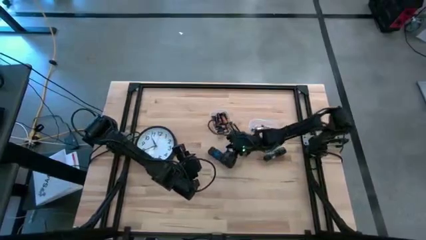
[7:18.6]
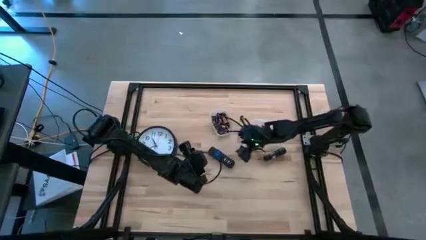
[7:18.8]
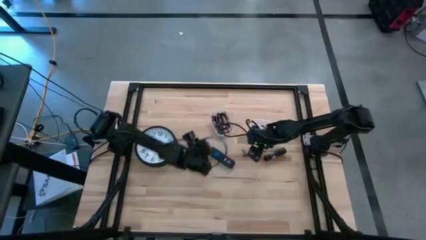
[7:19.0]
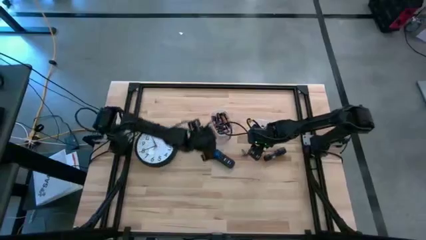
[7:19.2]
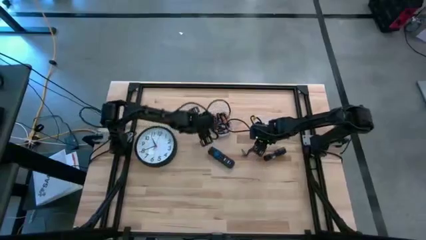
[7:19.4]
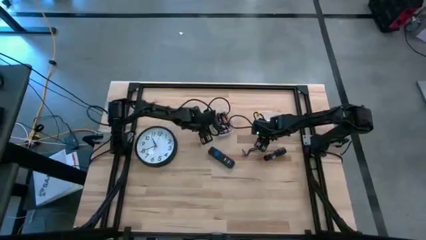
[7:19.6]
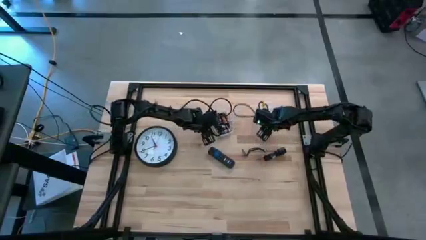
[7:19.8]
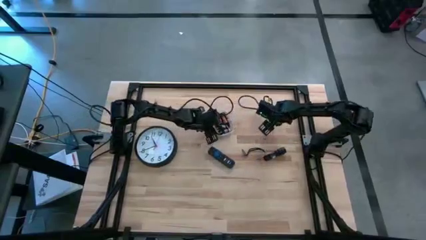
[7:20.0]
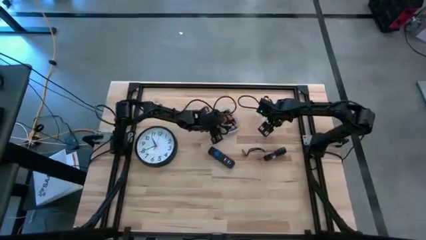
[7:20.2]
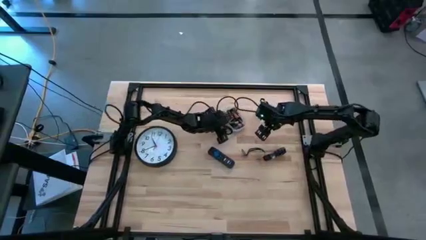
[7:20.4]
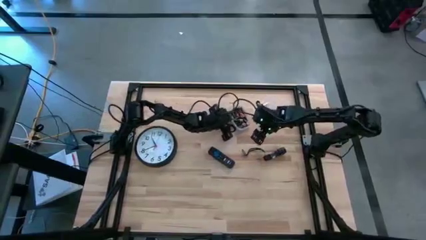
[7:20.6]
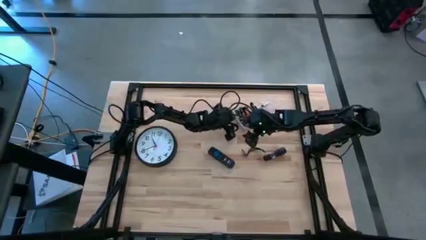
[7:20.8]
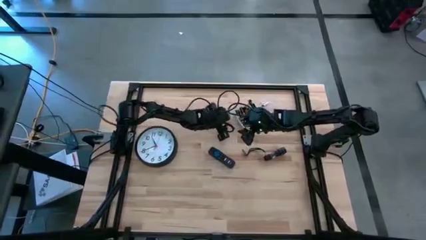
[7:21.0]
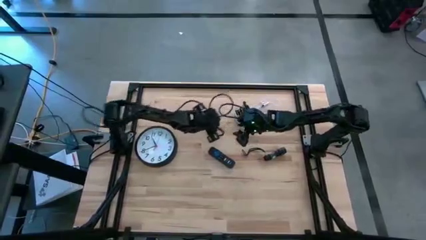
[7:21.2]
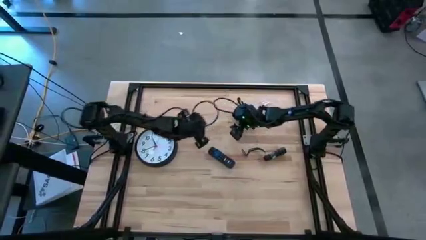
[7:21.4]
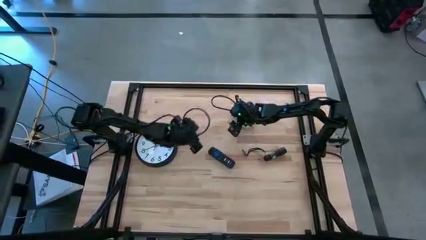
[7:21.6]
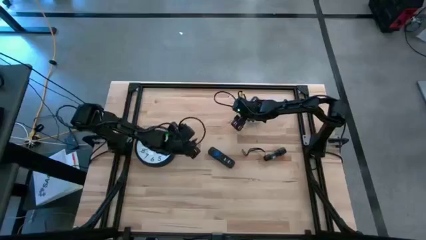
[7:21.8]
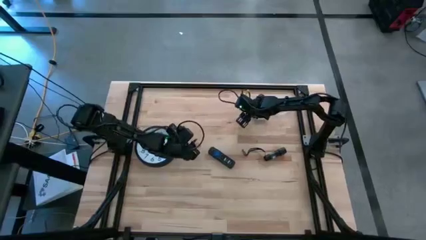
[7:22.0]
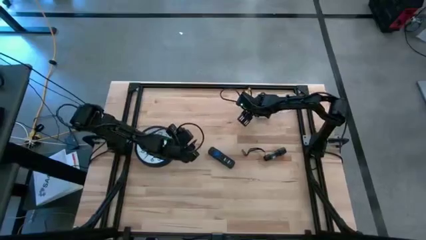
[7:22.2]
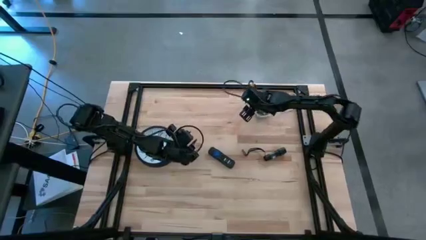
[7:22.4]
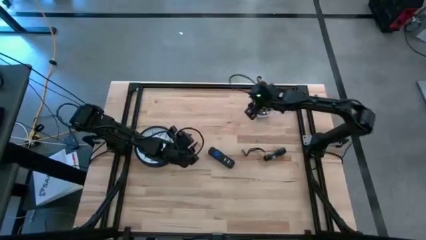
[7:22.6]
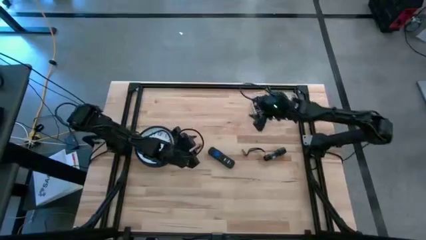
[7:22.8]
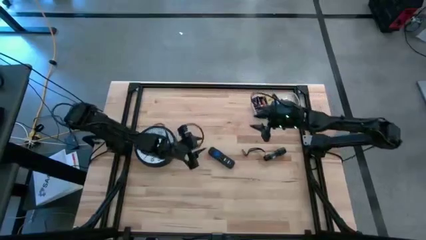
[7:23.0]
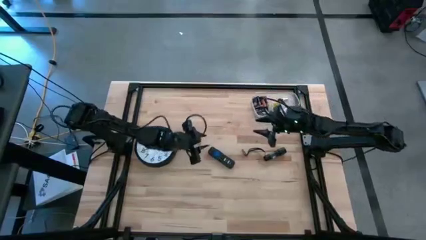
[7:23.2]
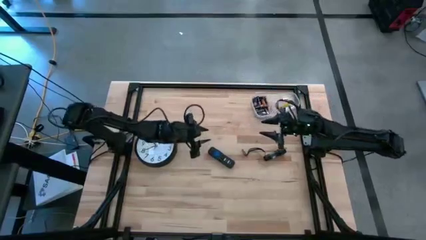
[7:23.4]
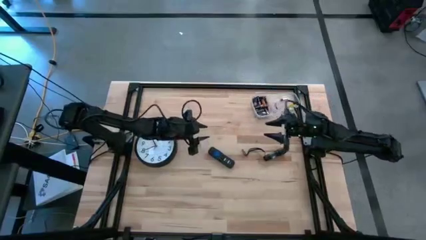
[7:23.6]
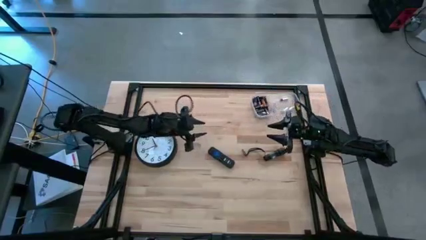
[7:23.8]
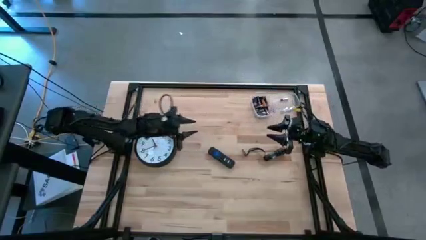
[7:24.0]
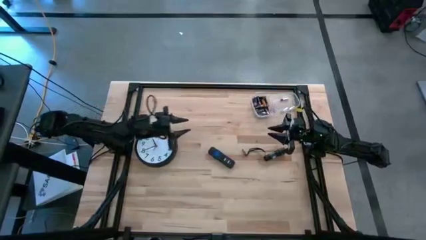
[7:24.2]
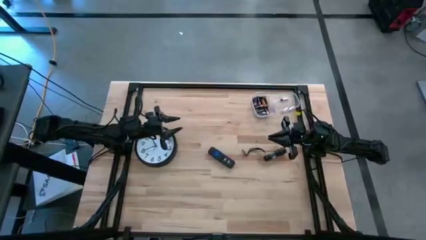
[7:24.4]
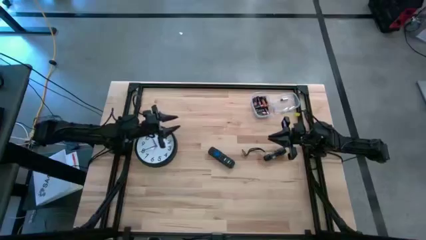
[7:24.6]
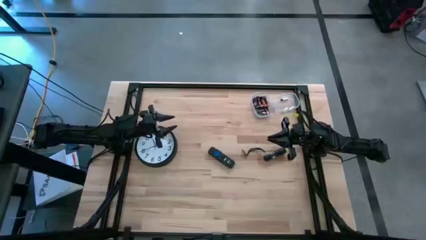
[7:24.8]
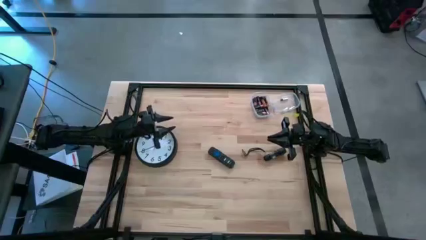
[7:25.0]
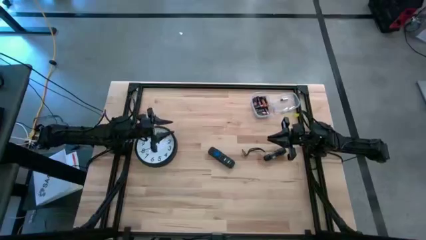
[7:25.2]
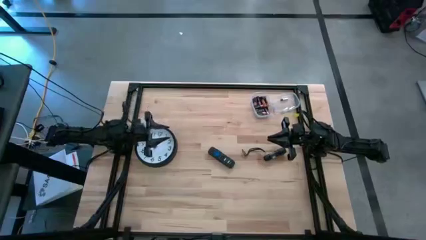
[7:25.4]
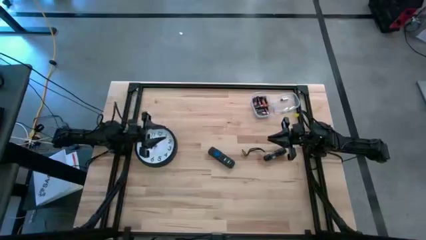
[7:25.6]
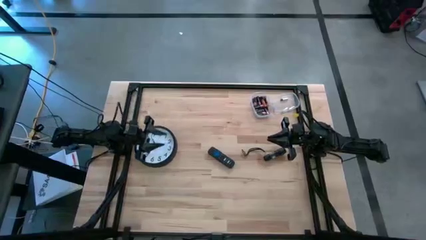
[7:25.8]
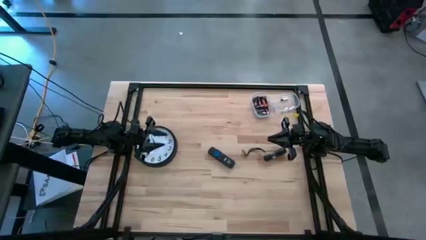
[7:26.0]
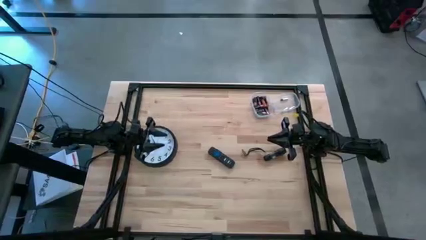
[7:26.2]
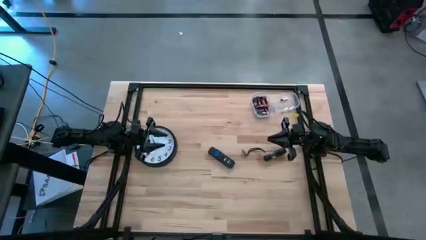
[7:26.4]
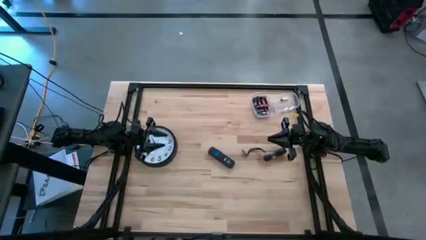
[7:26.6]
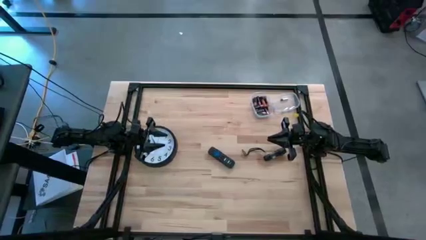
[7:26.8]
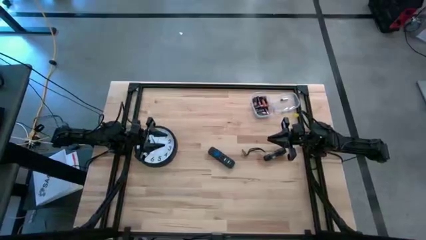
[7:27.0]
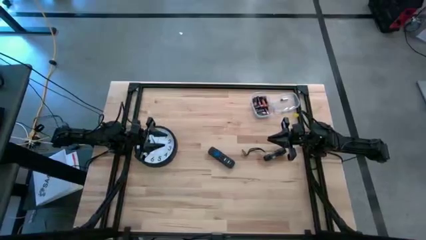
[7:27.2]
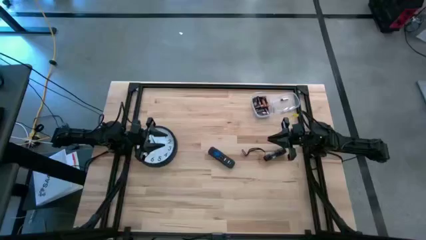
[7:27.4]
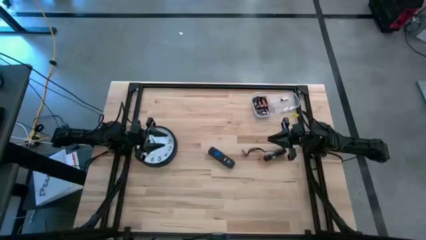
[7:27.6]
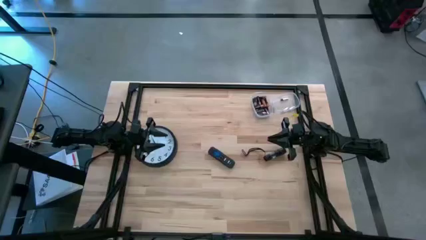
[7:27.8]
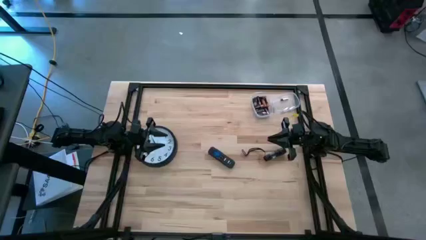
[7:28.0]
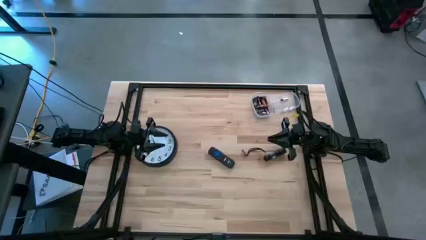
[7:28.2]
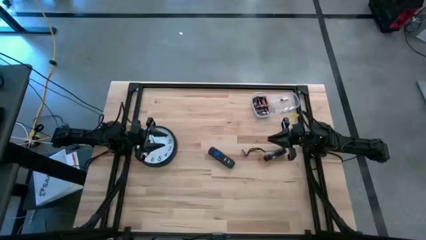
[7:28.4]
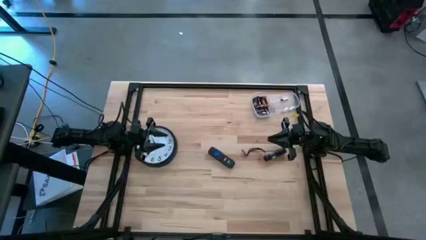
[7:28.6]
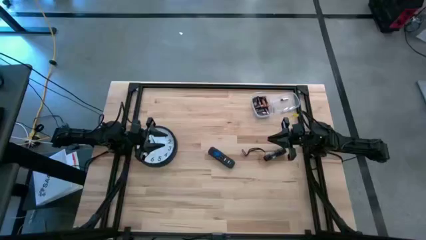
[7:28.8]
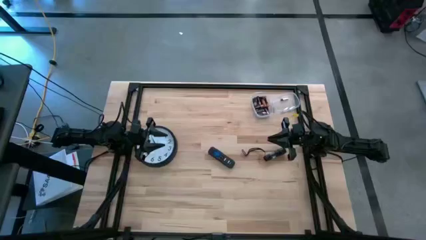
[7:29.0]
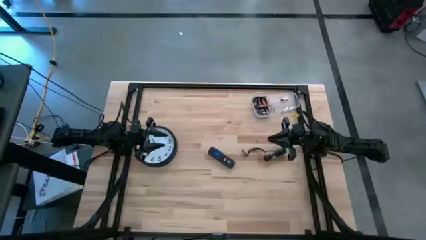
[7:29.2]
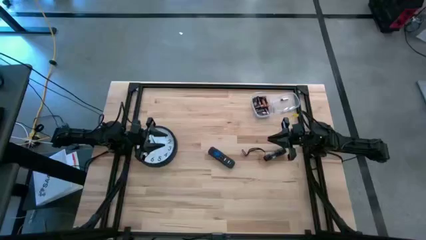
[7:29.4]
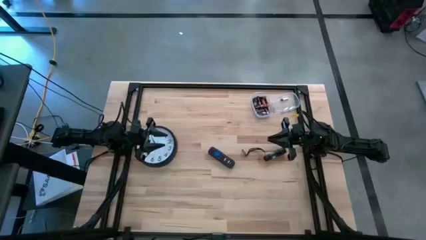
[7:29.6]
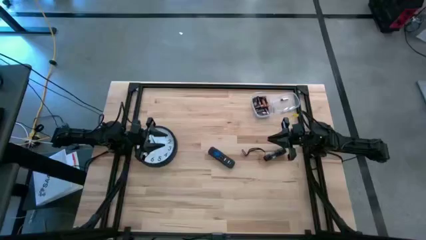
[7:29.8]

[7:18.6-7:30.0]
Task: Insert battery
Return to Home Position

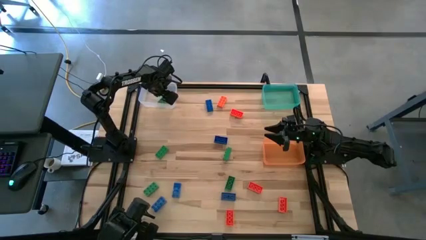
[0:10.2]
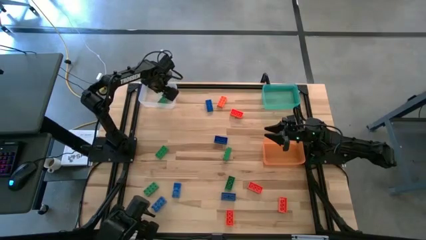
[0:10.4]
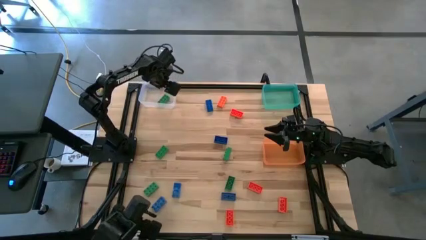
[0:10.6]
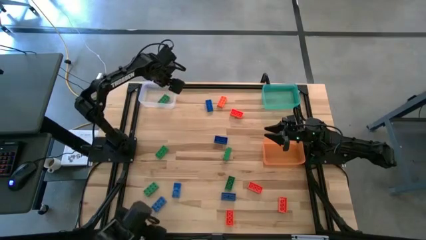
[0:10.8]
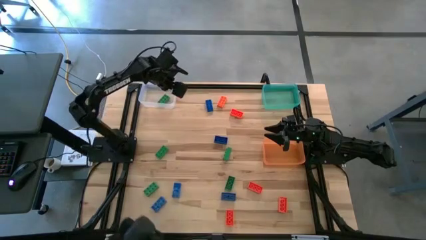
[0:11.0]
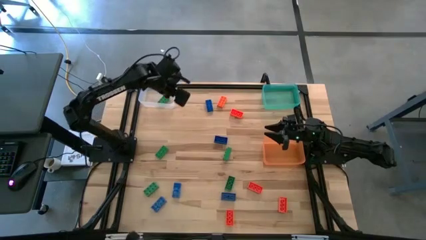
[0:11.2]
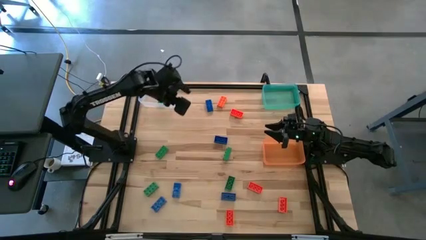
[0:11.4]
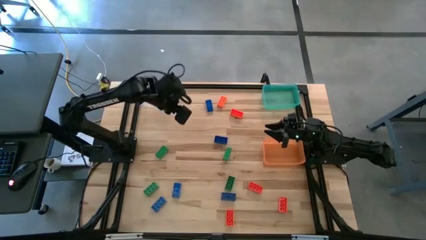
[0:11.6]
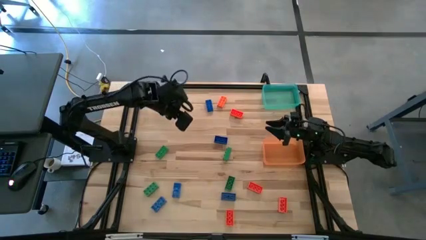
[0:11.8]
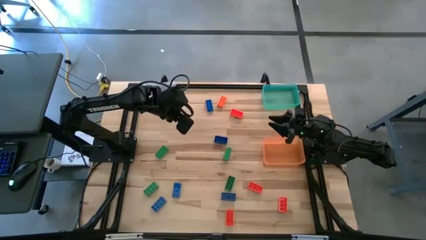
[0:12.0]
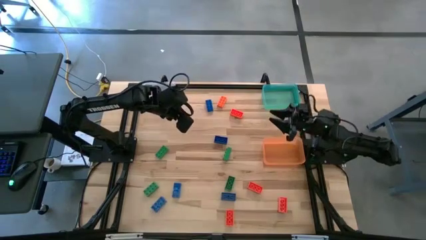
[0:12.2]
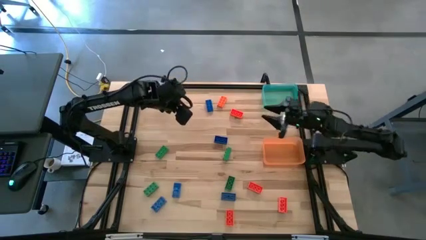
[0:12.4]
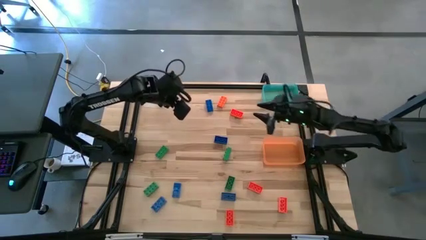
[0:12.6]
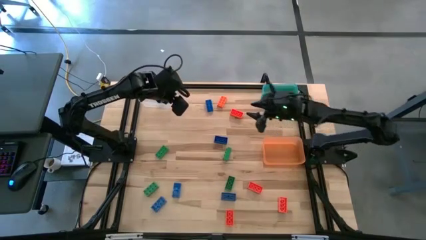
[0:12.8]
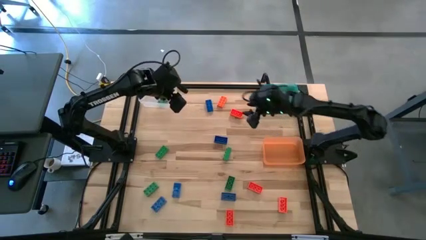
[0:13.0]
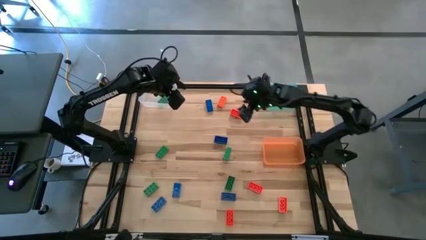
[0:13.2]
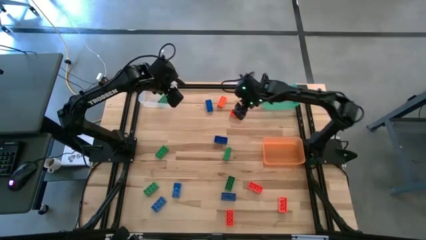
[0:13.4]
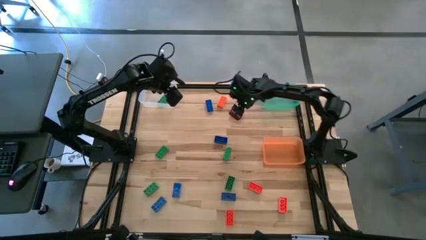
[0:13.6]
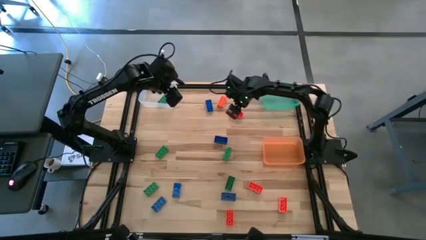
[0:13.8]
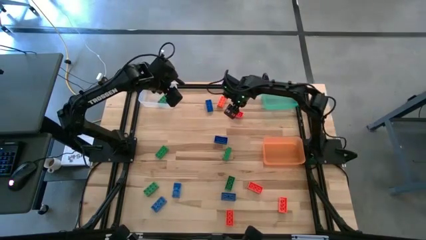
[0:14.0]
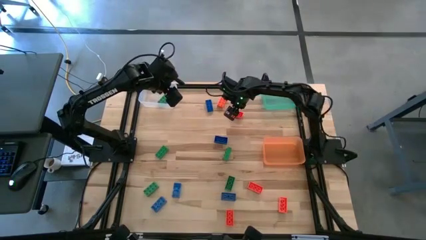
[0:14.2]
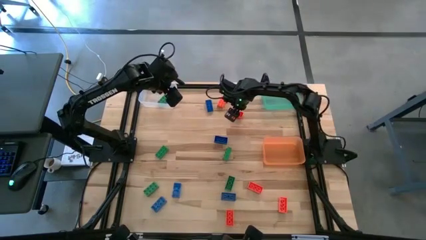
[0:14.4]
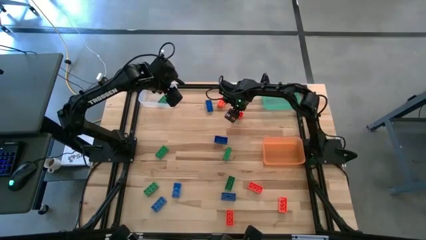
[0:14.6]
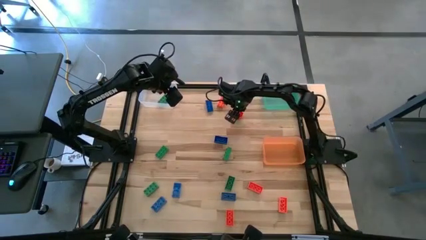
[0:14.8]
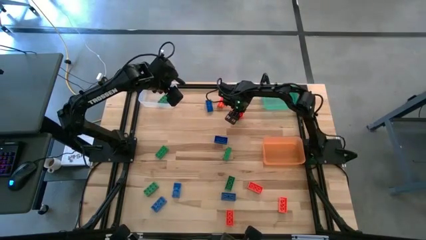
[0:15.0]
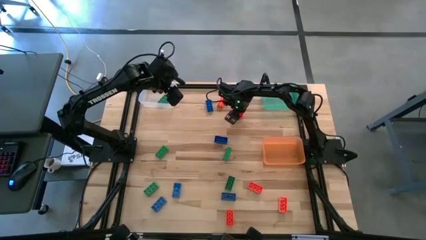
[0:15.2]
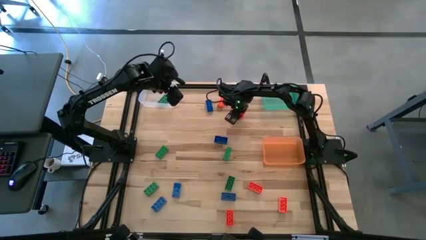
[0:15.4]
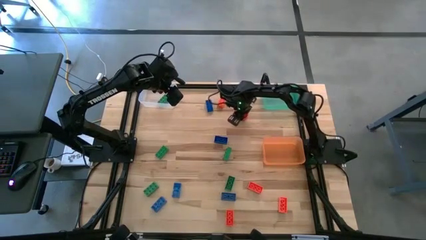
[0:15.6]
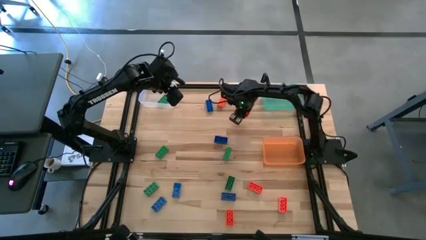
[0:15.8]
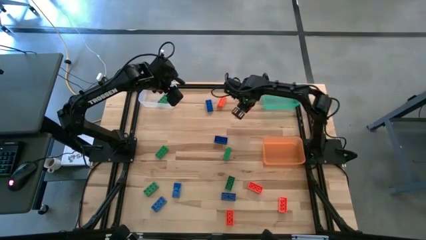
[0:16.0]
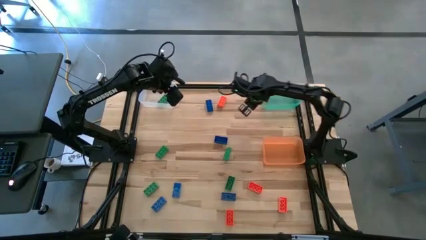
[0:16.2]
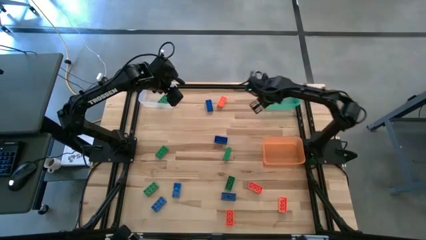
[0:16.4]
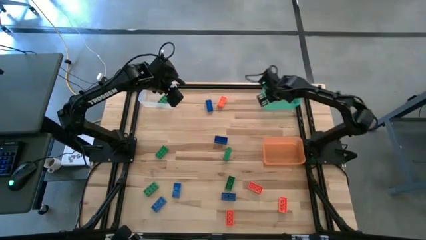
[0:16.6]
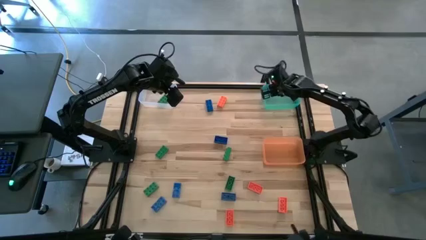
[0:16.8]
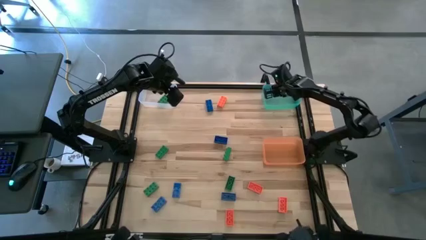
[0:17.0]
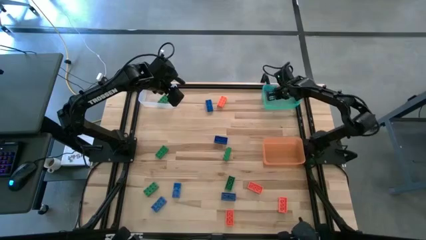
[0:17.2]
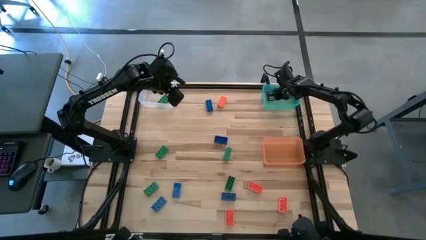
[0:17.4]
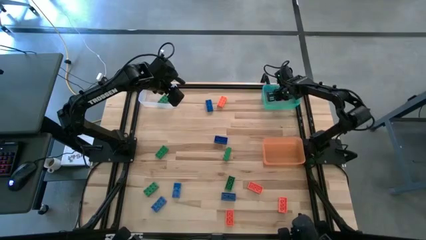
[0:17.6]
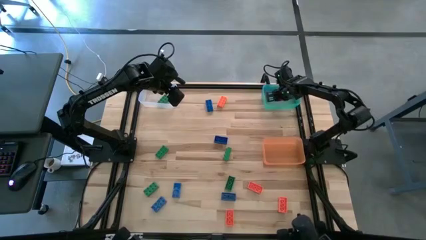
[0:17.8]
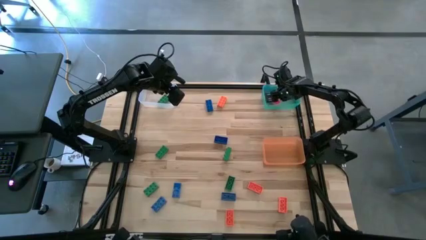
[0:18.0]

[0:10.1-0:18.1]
Task: Sort & place blocks by color
Put the orange game piece into the blue bin
